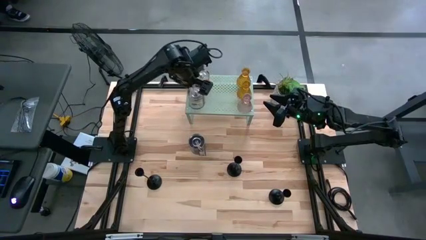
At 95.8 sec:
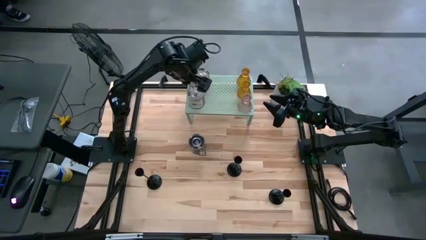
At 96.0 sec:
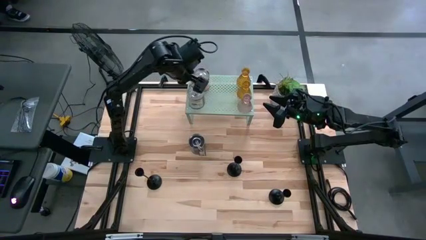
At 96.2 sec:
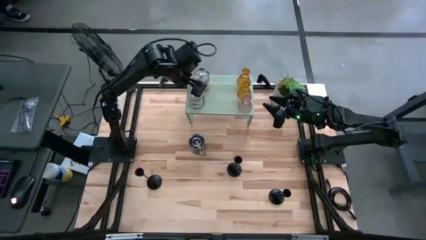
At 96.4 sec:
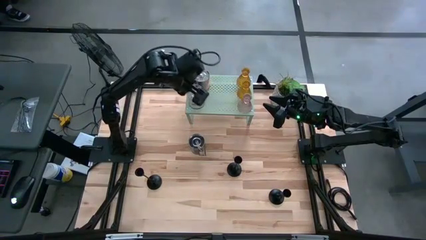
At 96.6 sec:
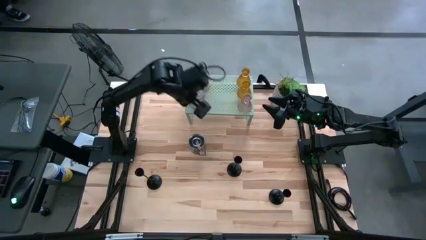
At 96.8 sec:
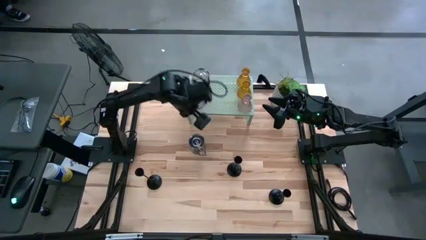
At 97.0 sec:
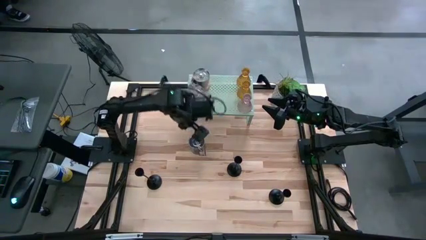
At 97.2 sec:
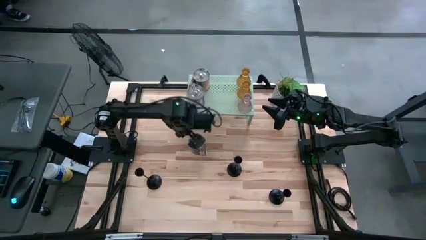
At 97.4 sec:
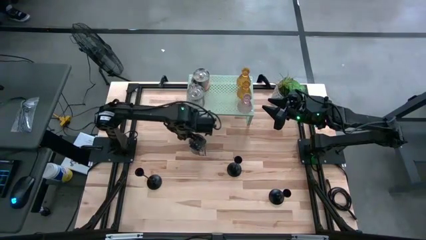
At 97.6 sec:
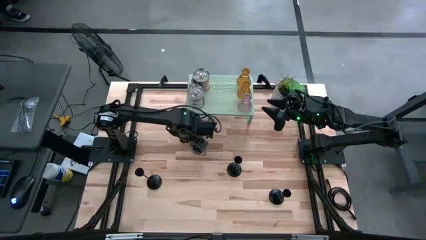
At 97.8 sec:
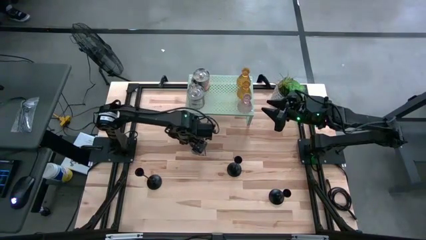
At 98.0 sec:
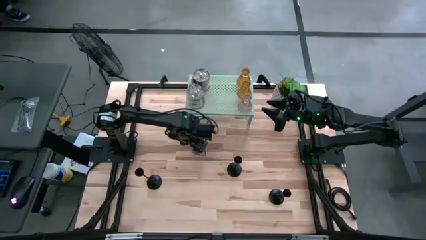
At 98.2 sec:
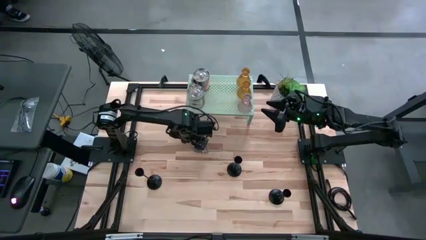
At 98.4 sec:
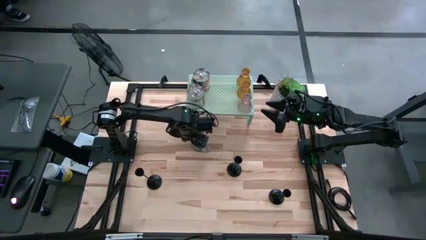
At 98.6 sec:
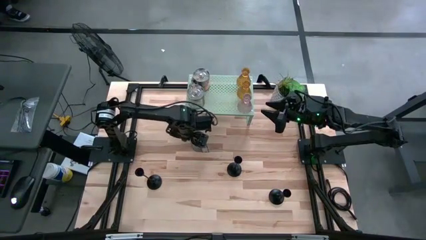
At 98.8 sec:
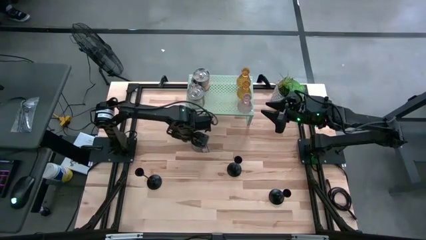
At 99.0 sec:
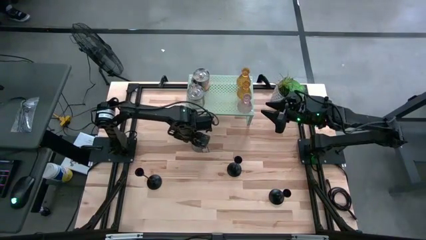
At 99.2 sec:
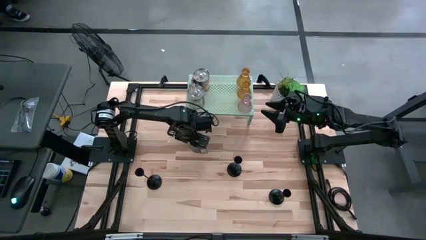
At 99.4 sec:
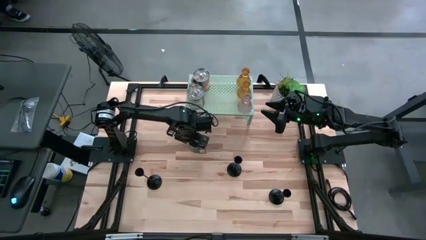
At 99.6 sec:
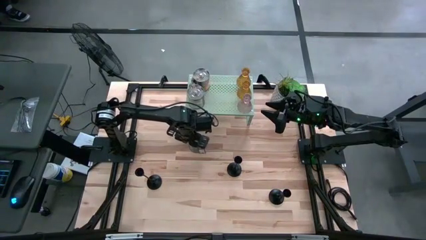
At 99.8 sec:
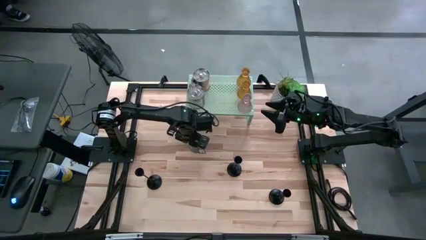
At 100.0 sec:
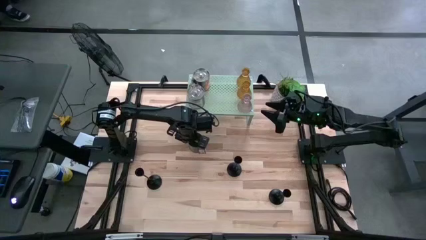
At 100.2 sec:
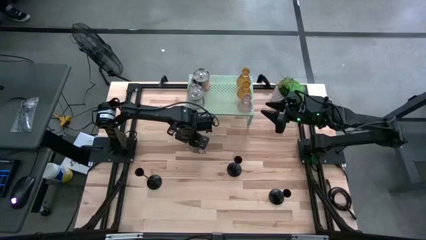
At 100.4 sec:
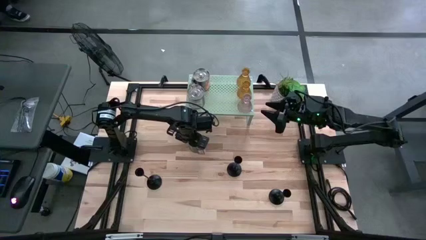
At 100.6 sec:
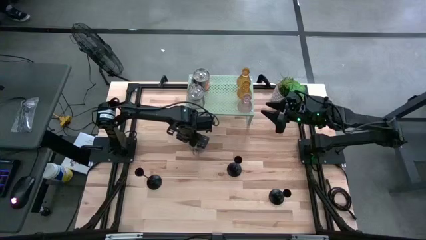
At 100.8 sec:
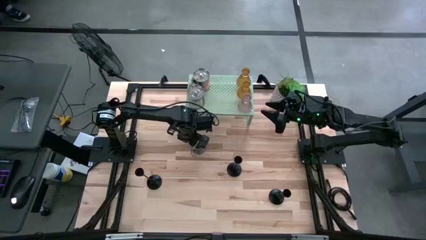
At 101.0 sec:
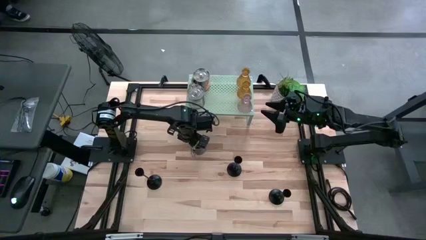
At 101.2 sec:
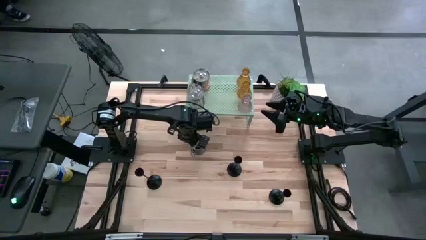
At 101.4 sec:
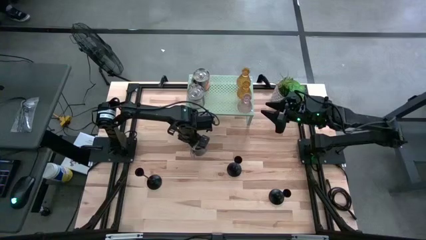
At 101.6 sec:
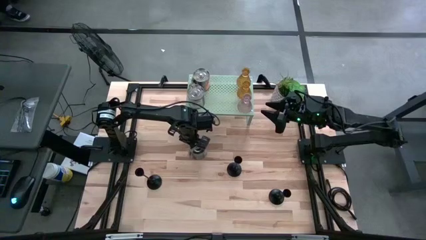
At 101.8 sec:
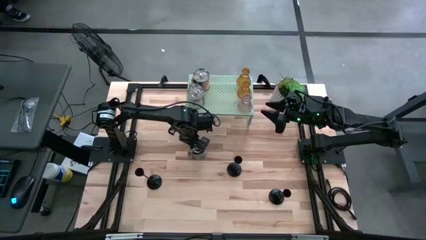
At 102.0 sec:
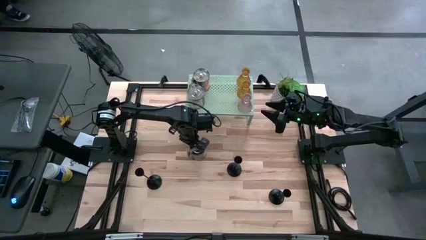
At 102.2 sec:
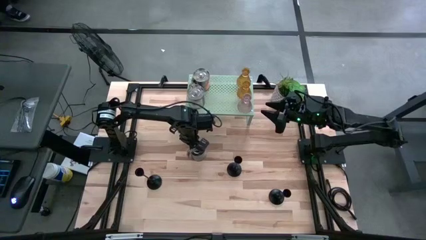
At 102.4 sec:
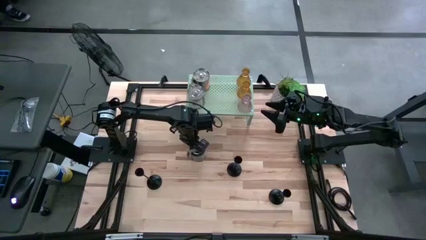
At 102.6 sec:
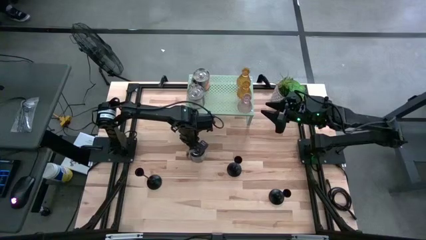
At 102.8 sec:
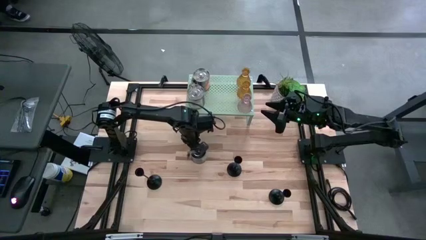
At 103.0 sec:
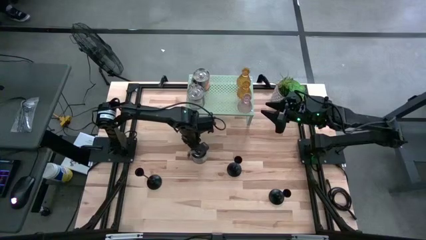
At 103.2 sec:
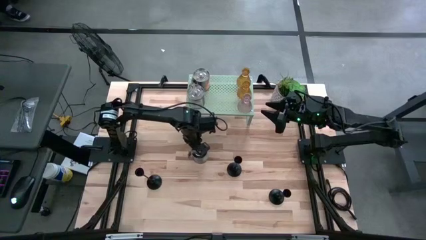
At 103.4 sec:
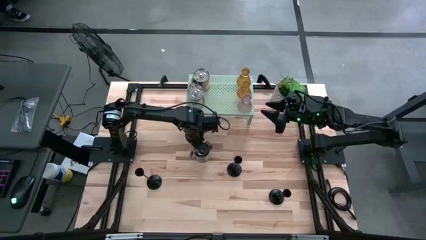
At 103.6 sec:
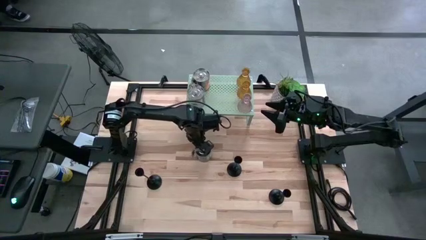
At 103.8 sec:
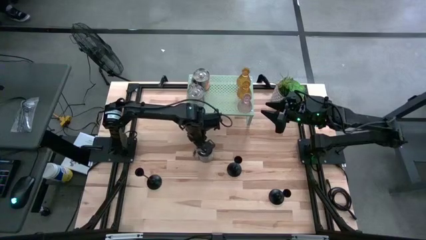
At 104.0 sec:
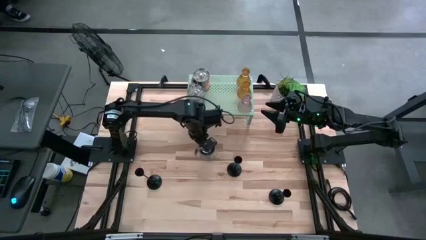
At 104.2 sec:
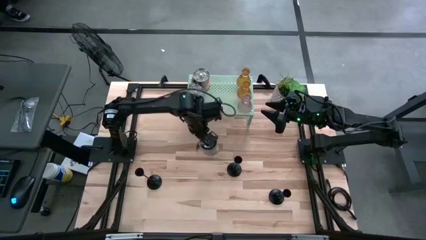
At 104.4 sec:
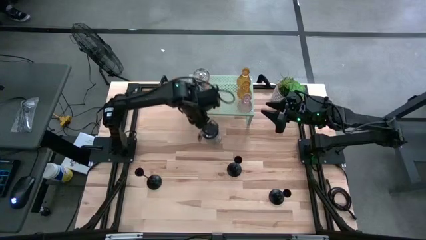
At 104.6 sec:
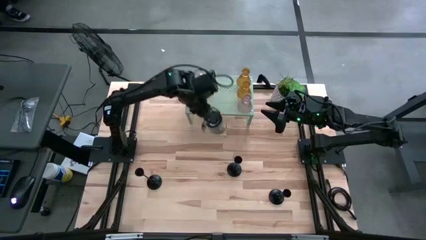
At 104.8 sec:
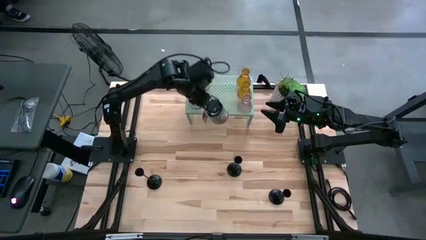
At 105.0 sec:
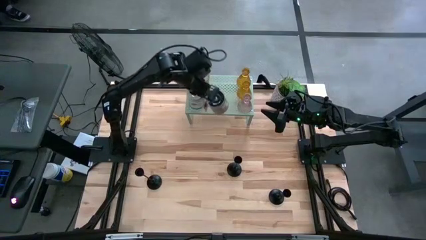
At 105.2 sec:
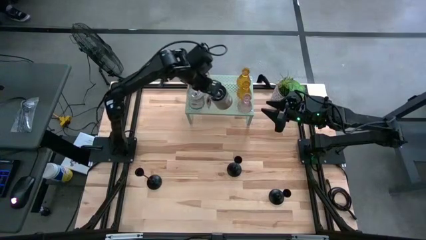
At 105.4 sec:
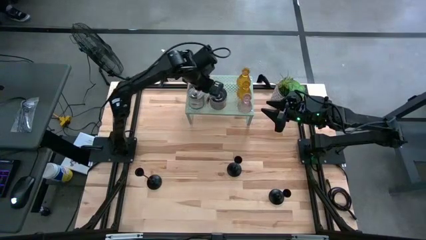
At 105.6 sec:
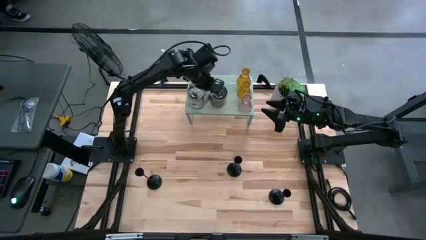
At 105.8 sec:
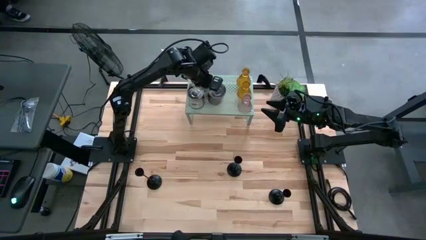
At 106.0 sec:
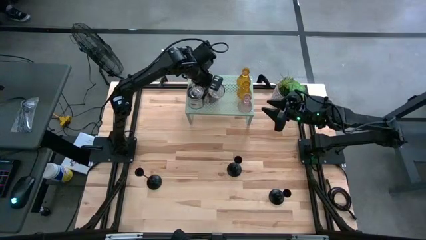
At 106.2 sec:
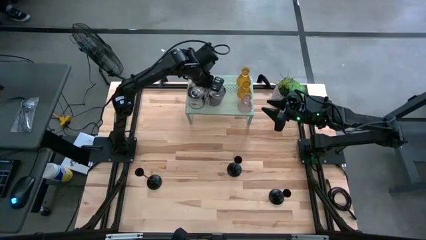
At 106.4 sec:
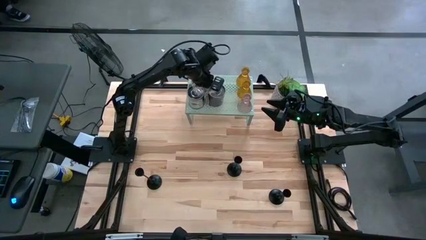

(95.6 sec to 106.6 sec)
Task: Pick & Place candle stick holders
Put the brown scented candle on the shelf
